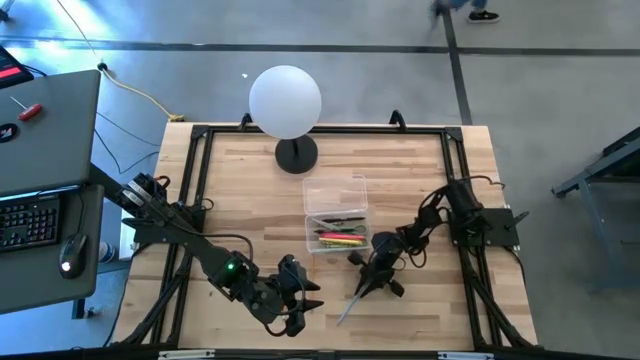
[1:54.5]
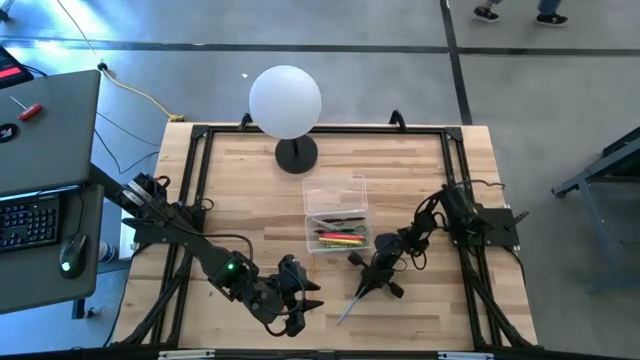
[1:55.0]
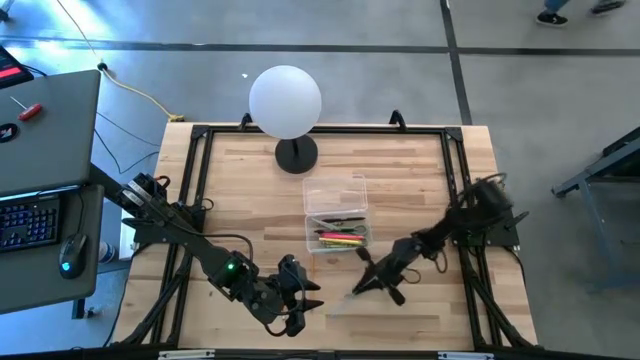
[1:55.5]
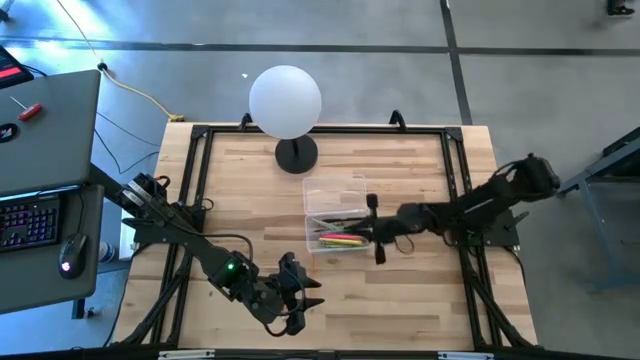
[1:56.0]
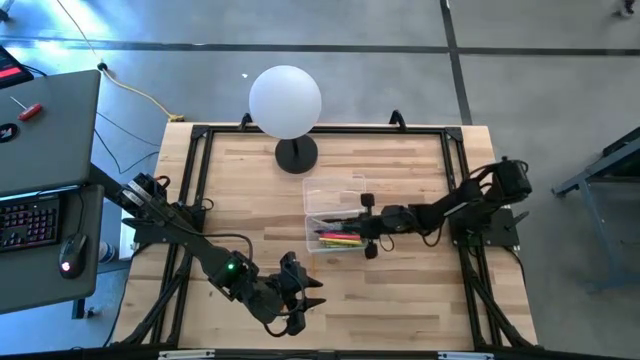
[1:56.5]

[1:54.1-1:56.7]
Task: Pick & place school supplies into a supply box
Put the blue pencil into the transparent supply box

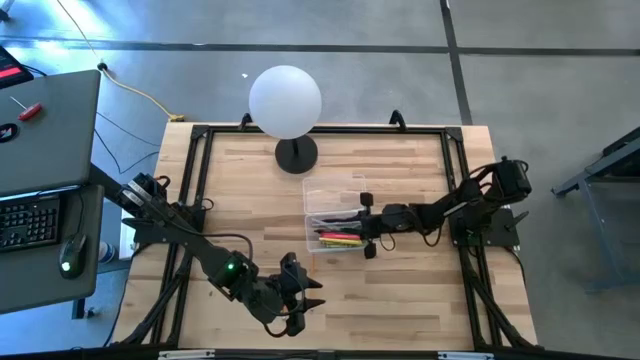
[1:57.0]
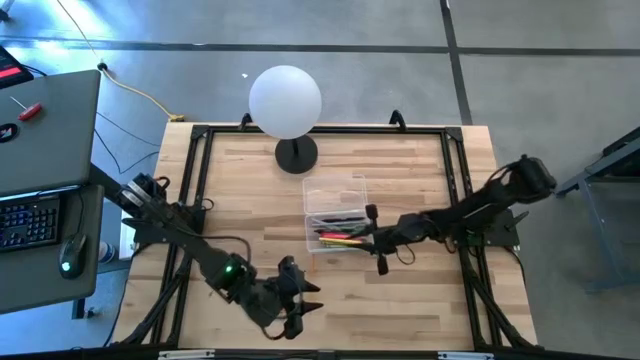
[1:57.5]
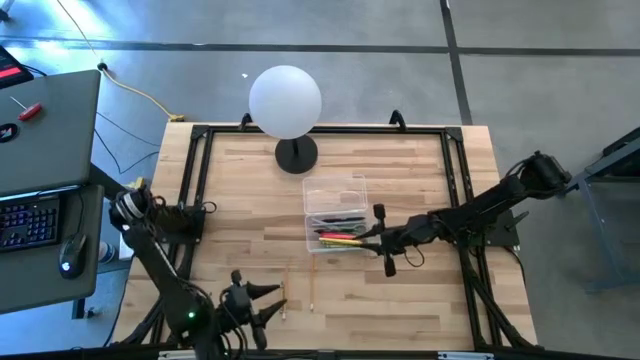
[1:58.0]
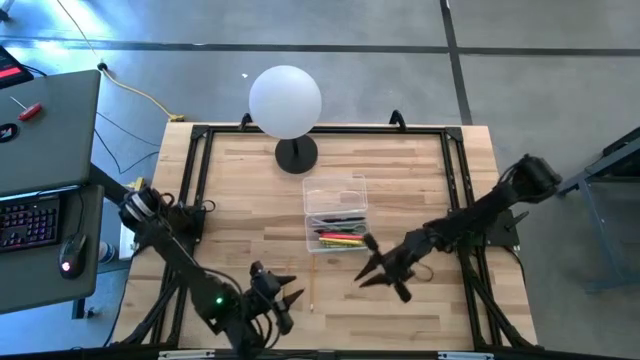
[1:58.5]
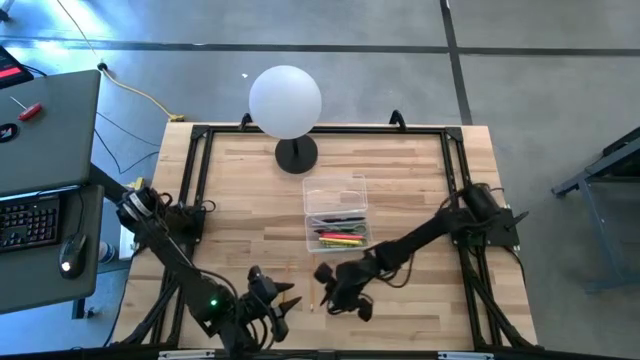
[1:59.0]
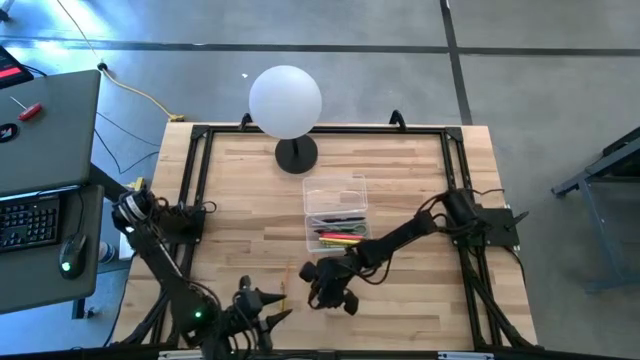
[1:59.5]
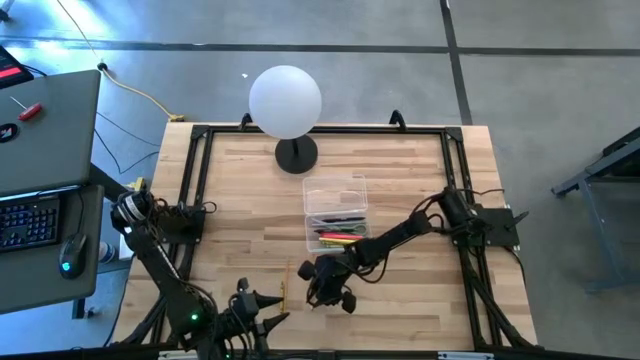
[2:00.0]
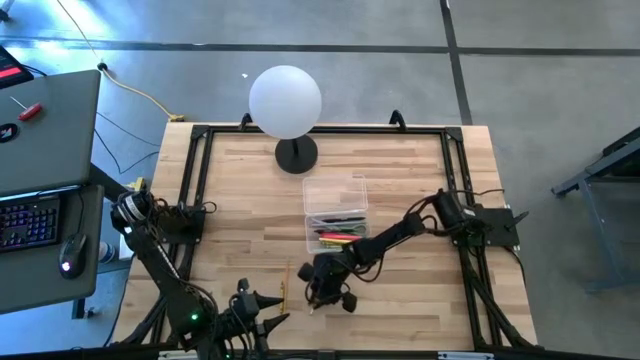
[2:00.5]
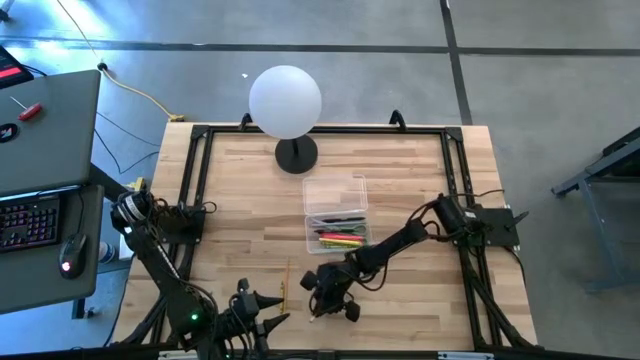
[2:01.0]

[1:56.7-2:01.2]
Put the right orange pencil into the transparent supply box

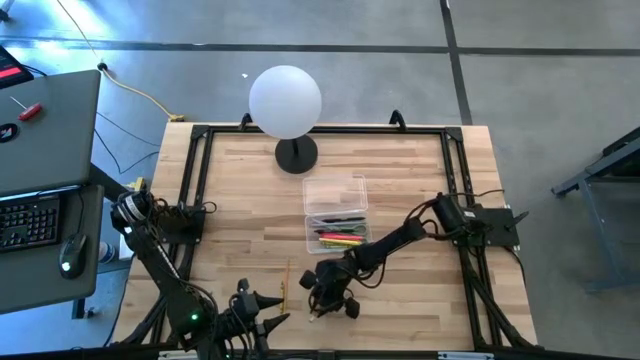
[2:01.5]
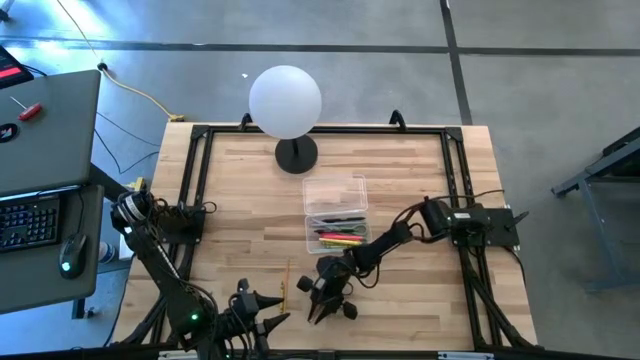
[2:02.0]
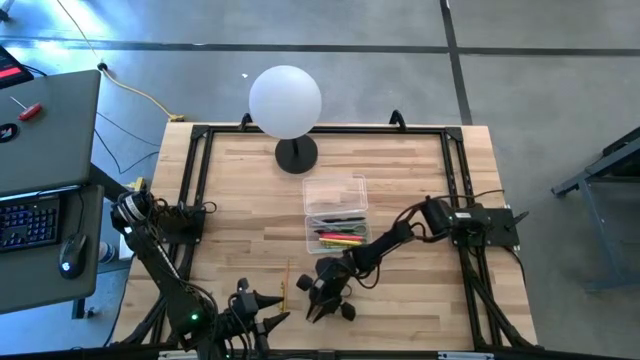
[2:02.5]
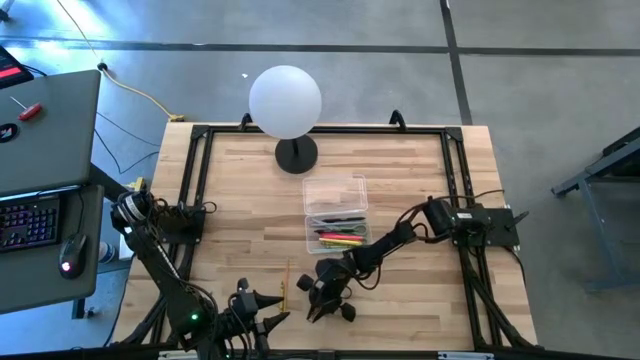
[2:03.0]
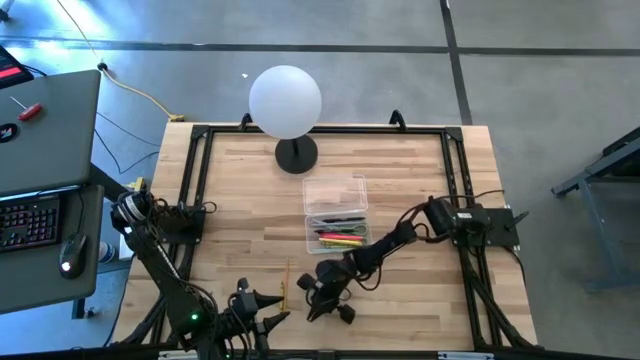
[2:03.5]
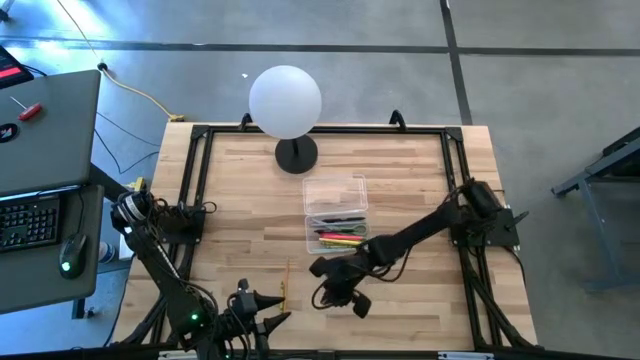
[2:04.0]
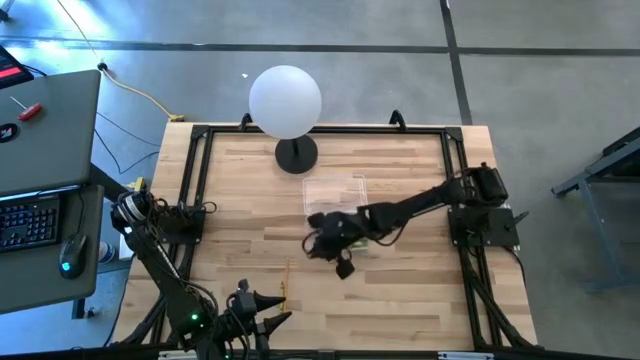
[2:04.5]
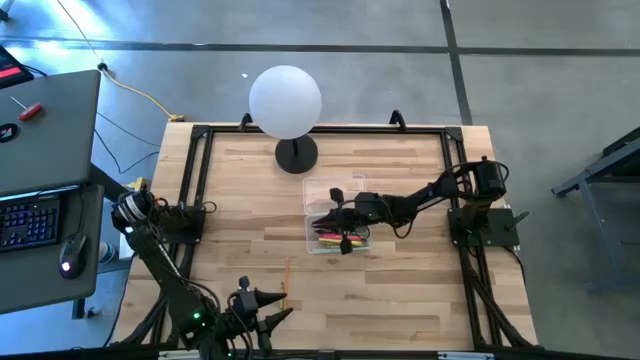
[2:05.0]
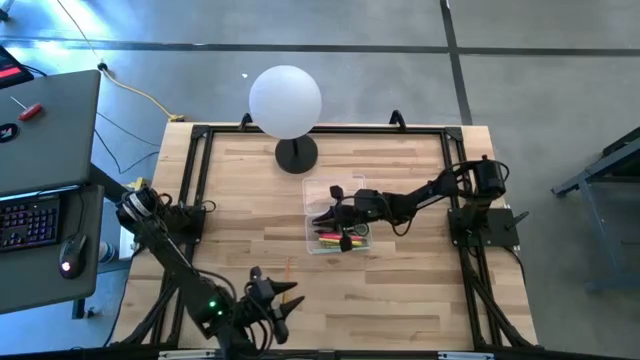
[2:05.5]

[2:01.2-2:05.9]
Put the right orange pencil into the transparent supply box

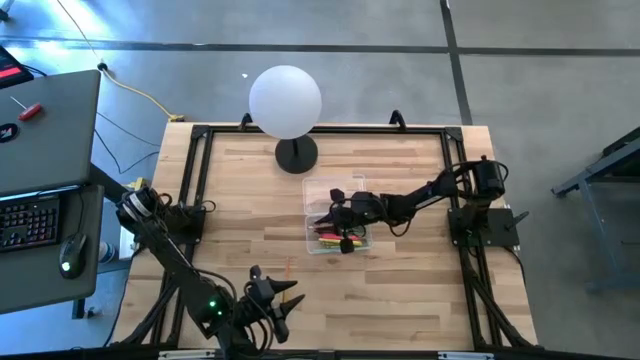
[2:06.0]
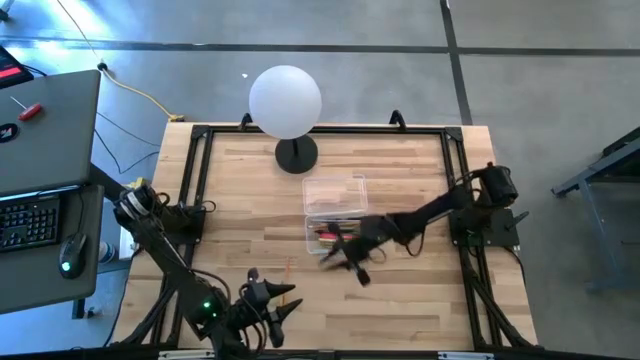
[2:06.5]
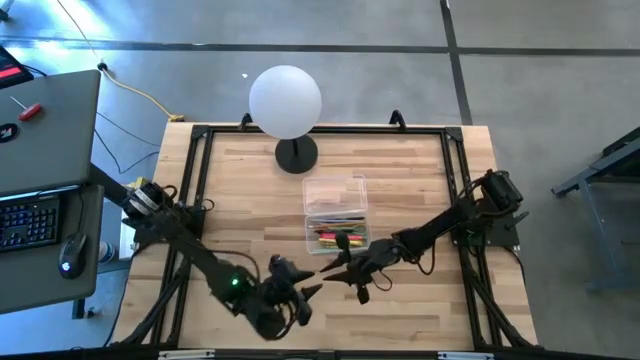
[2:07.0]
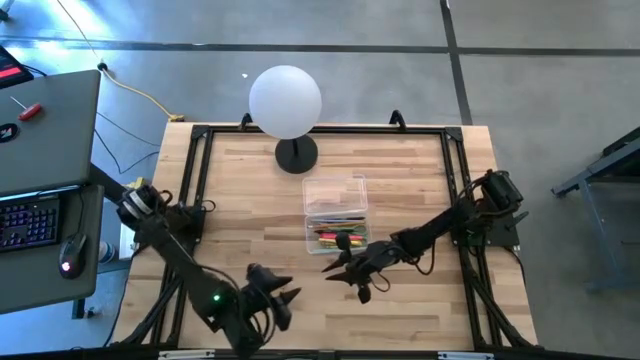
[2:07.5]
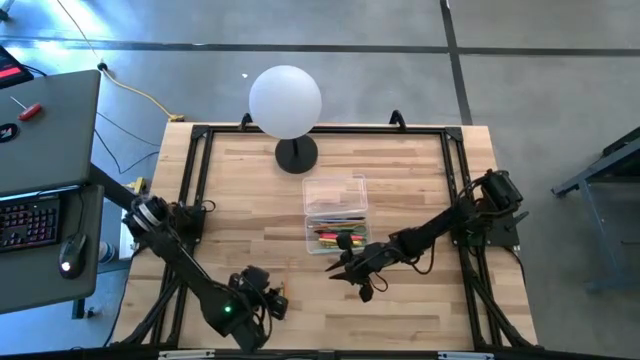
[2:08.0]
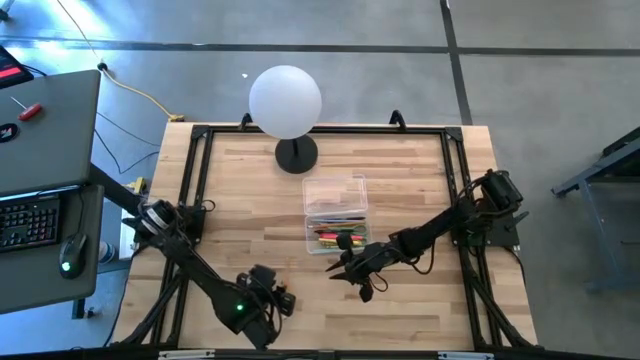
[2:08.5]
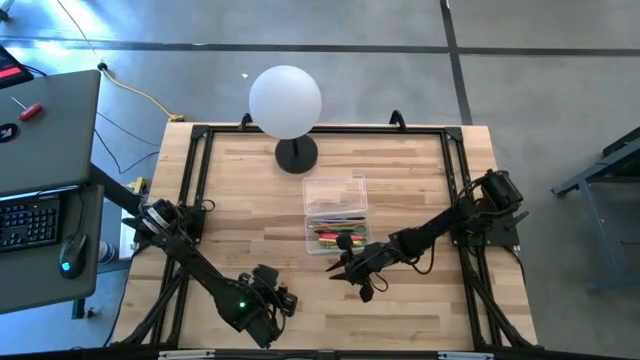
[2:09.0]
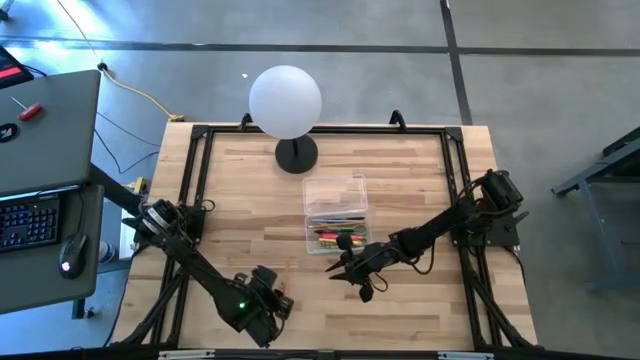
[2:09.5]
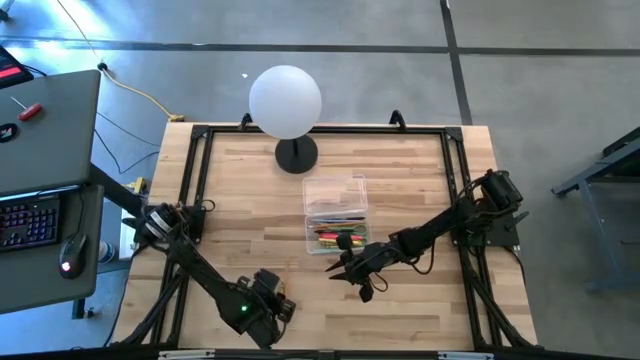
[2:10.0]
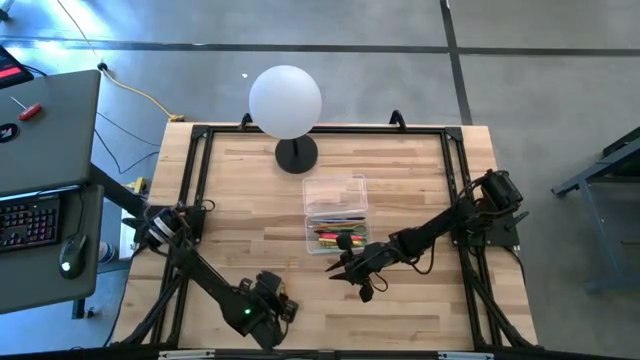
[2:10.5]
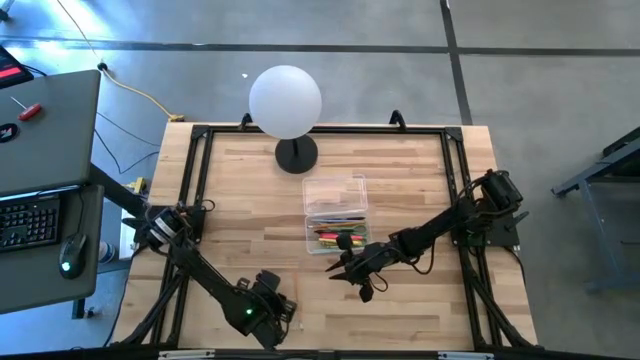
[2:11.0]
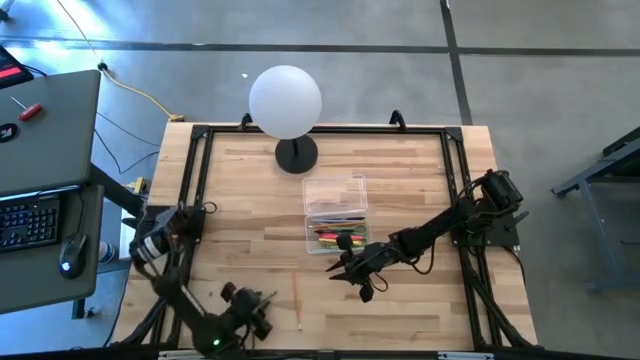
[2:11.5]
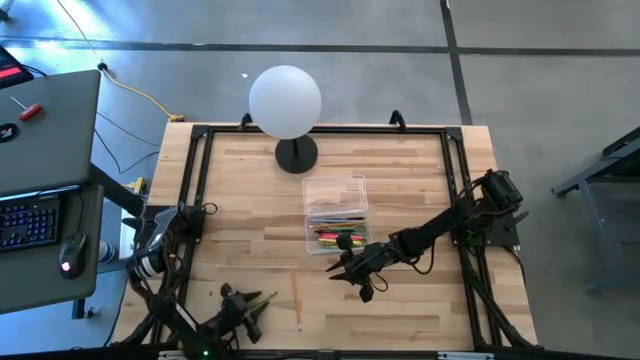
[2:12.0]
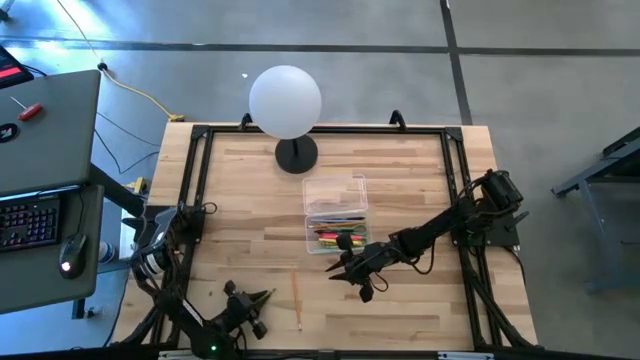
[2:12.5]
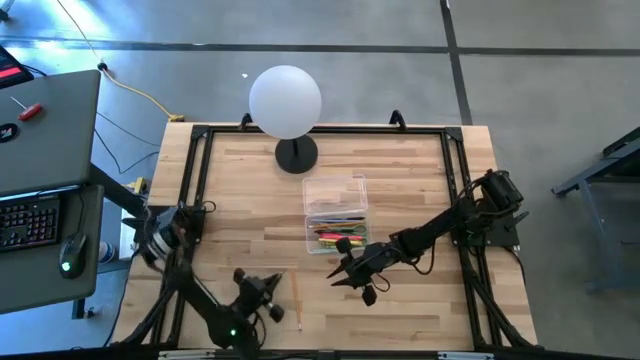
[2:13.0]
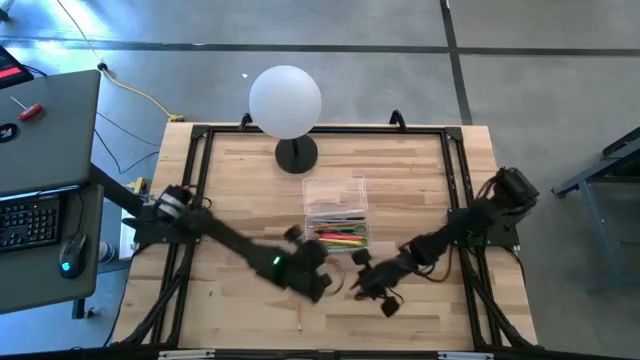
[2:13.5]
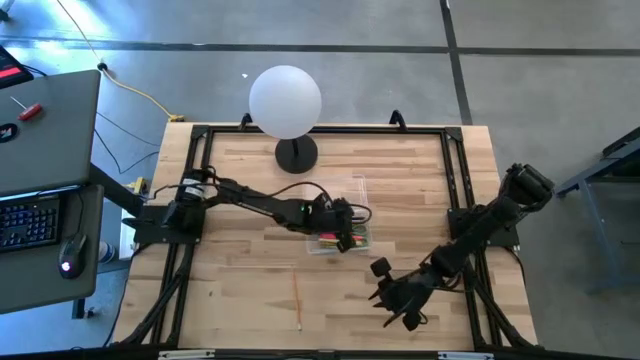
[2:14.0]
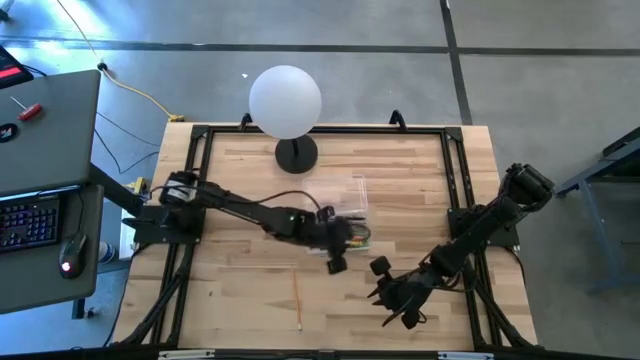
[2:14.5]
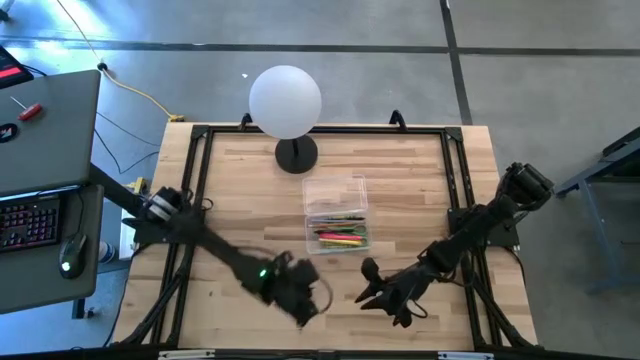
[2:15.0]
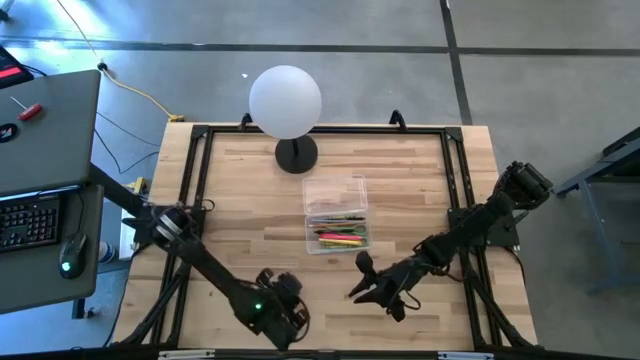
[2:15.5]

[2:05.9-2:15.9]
Put the light green crayon into the transparent supply box
